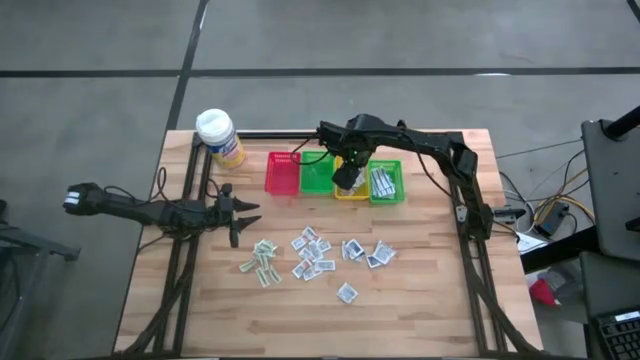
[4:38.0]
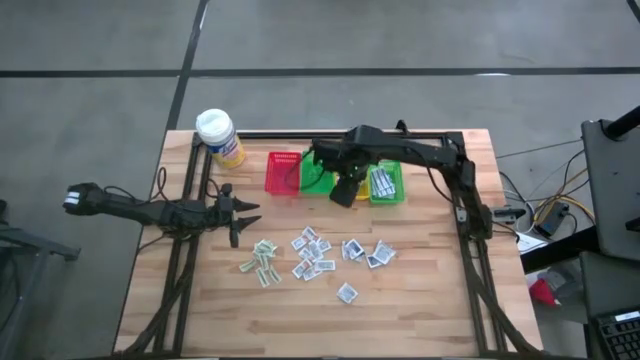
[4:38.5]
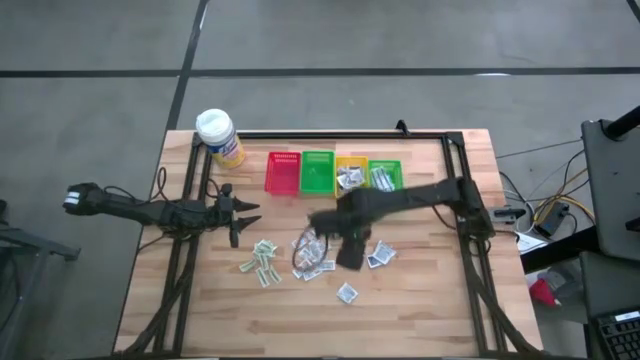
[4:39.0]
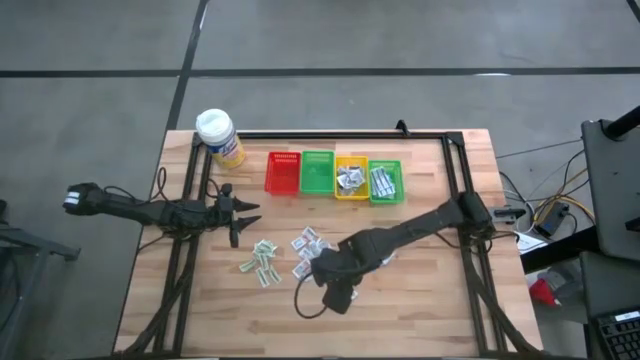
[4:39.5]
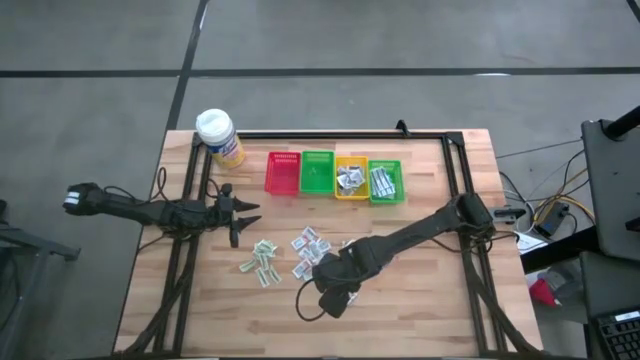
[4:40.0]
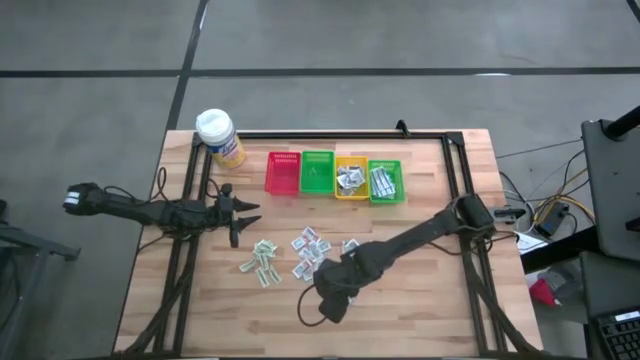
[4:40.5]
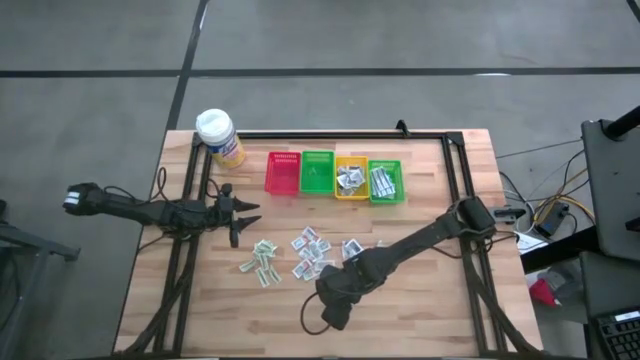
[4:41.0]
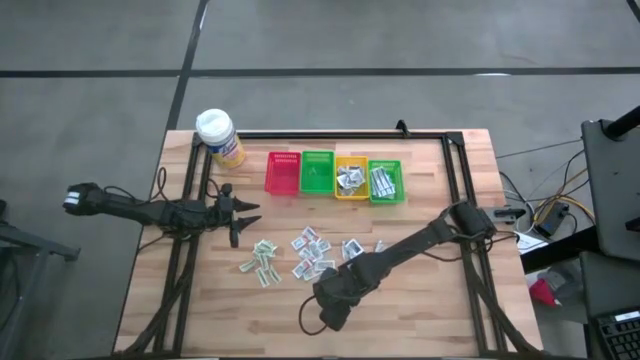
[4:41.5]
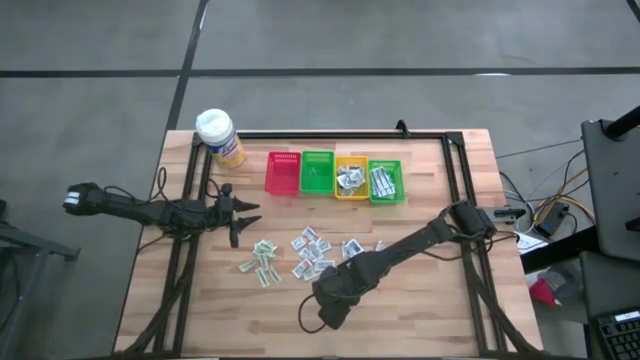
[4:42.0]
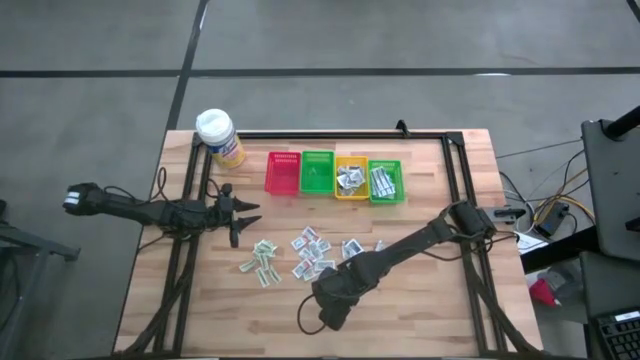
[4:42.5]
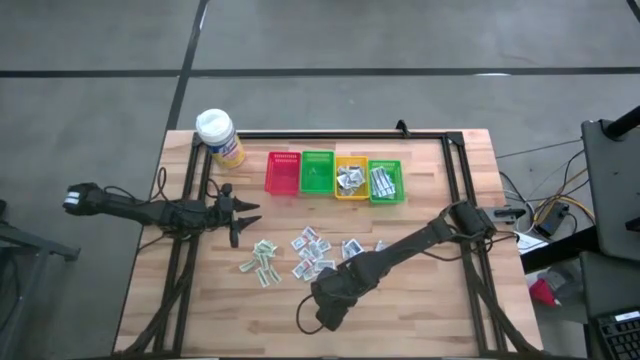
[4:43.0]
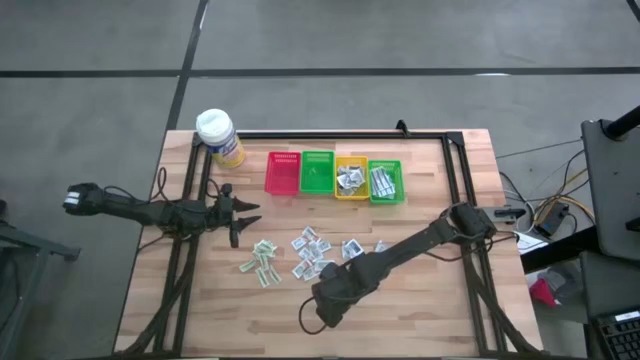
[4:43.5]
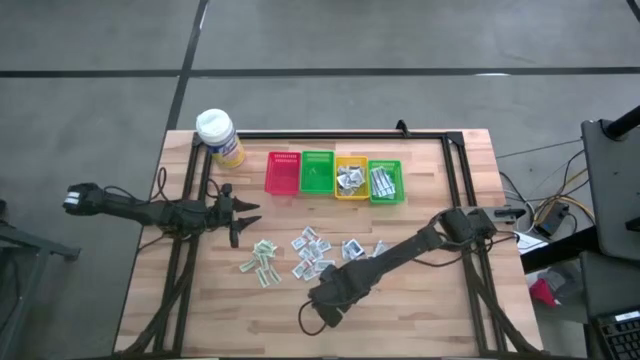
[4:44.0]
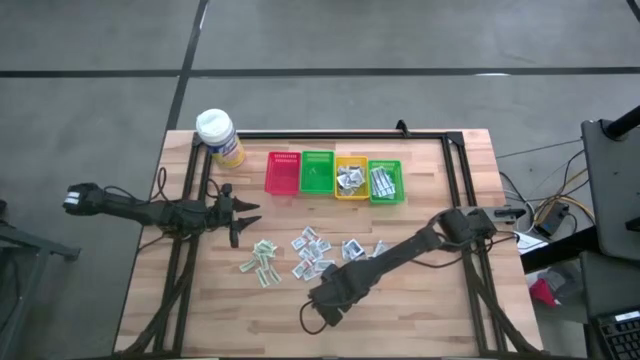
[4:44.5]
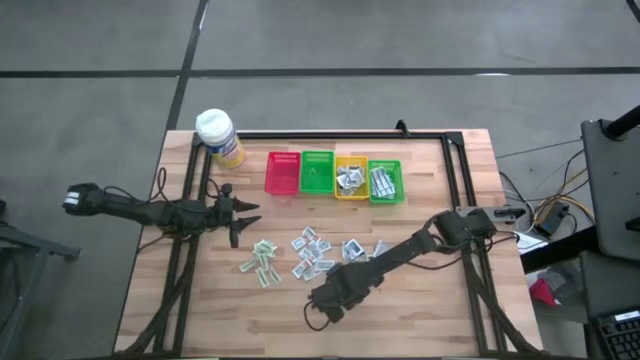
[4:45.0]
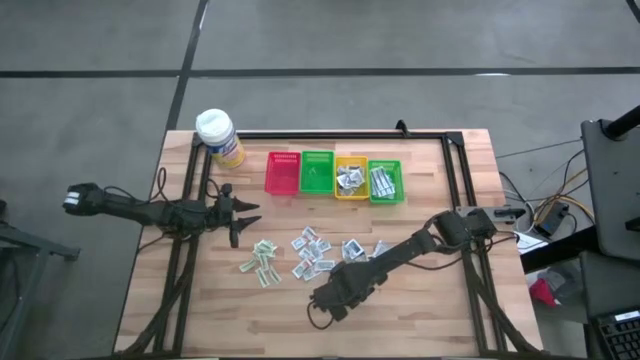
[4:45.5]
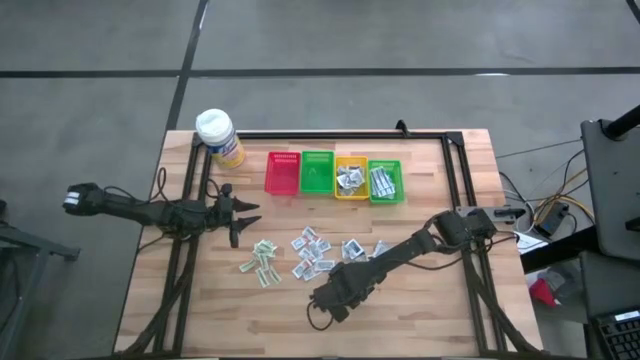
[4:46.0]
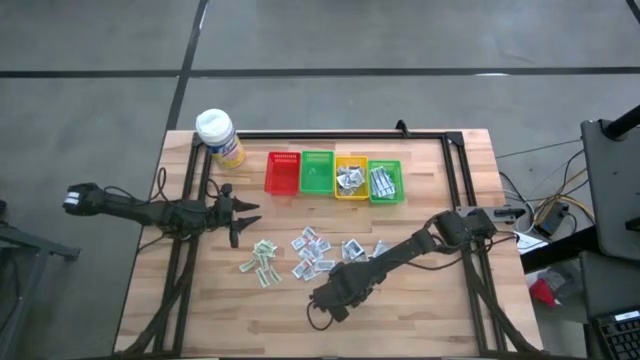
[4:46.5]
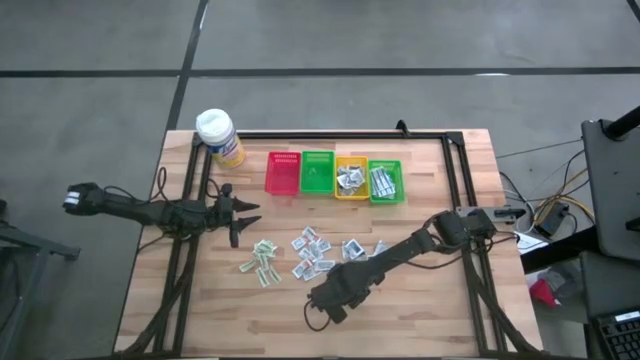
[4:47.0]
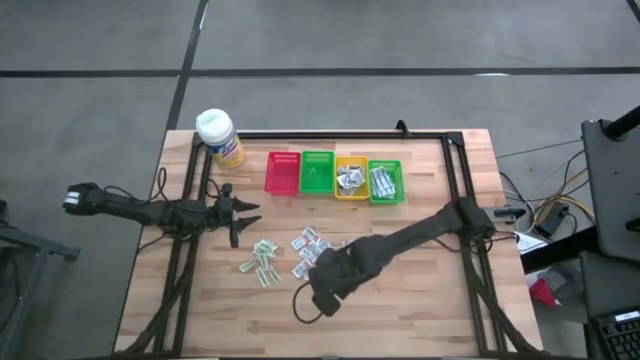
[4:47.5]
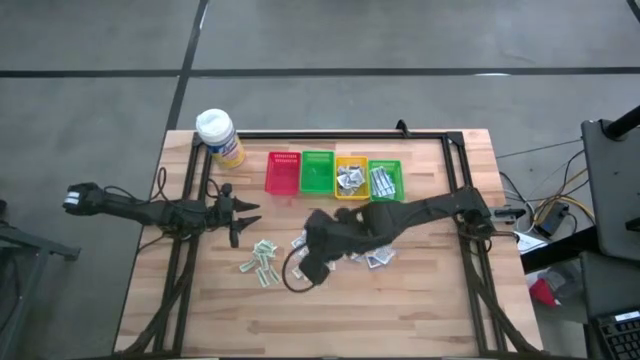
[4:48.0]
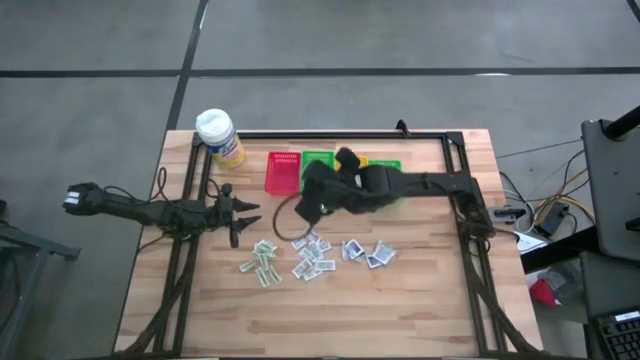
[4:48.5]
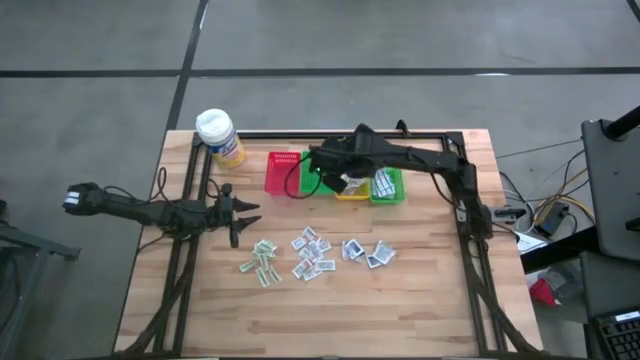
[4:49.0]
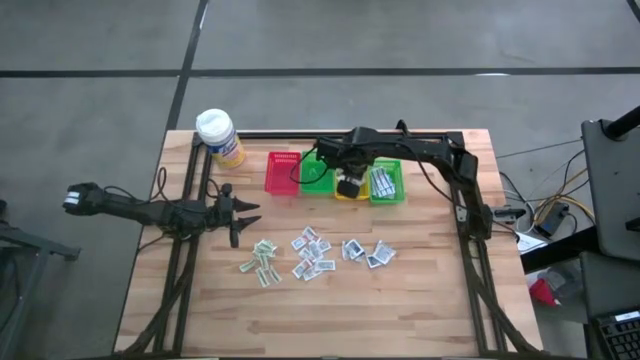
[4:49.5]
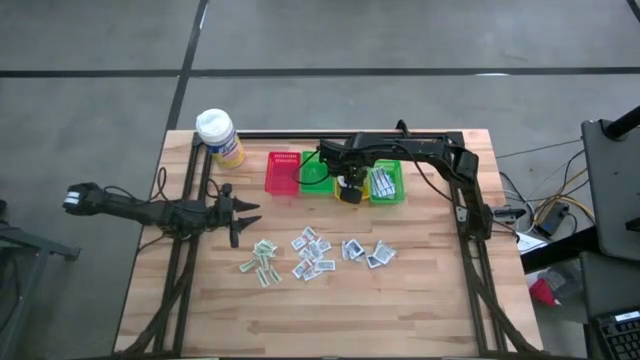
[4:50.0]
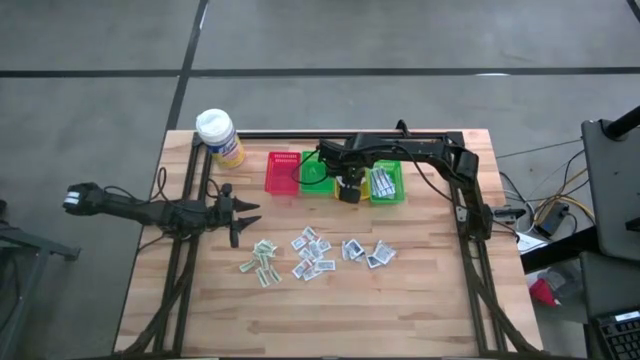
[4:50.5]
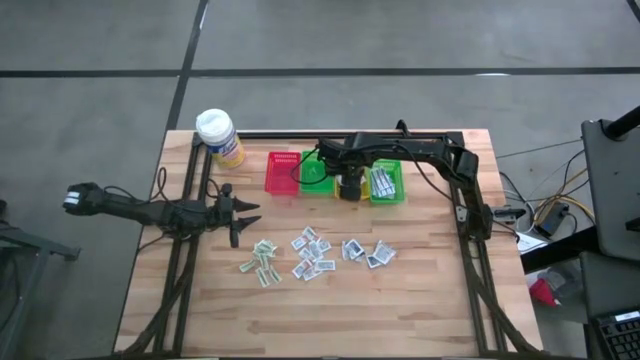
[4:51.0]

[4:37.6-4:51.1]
Task: Pick & Place First Aid Supplies
Put the blue alcohol pad into the yellow bin

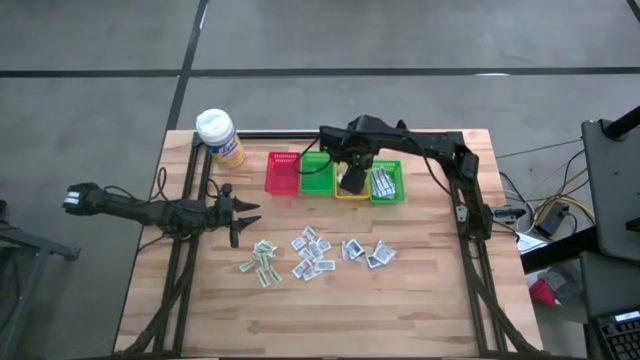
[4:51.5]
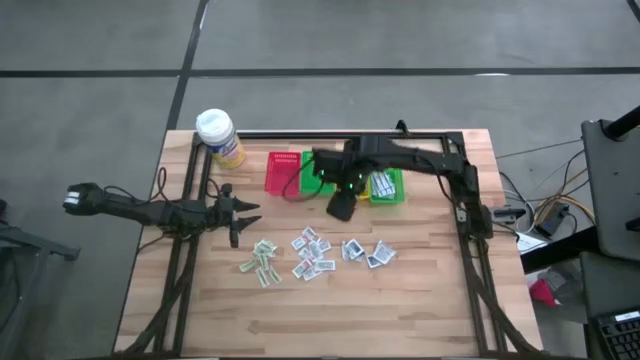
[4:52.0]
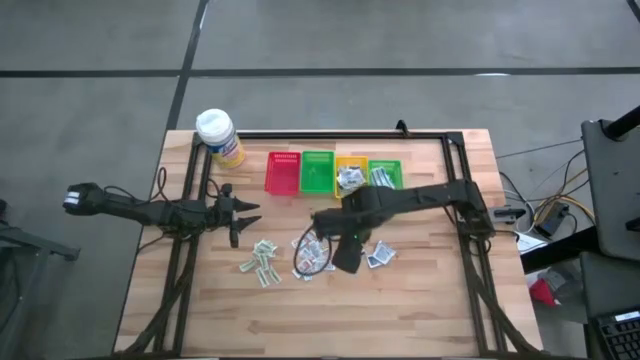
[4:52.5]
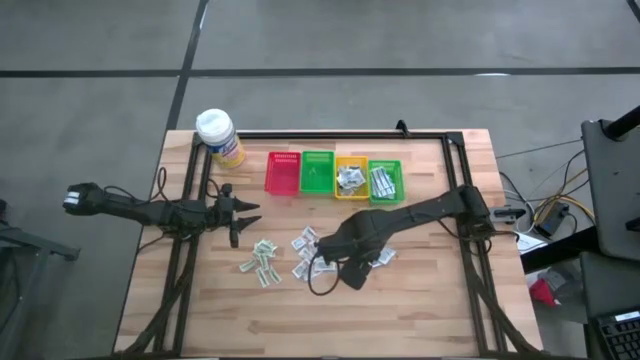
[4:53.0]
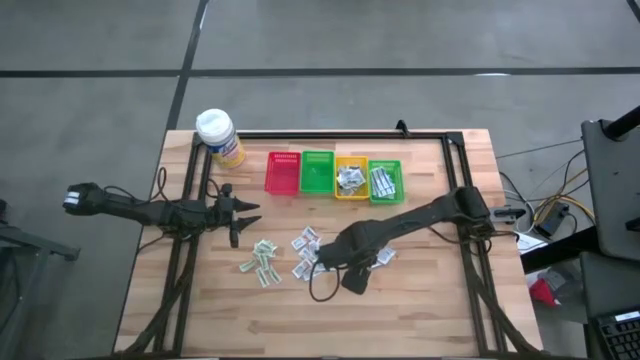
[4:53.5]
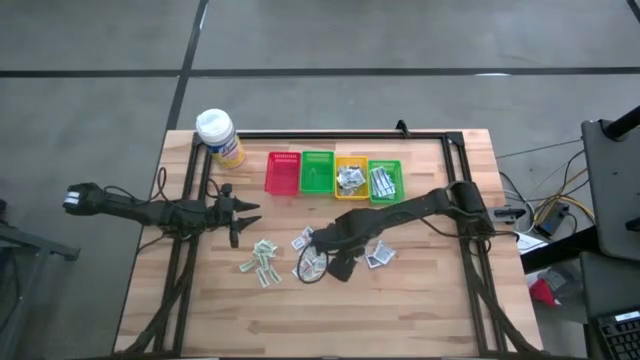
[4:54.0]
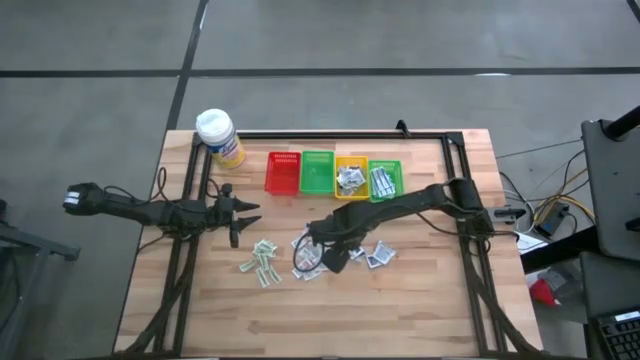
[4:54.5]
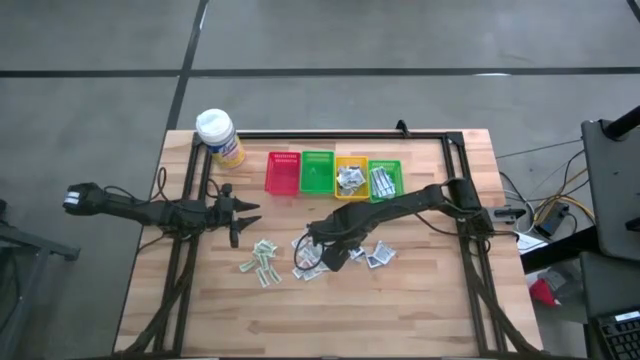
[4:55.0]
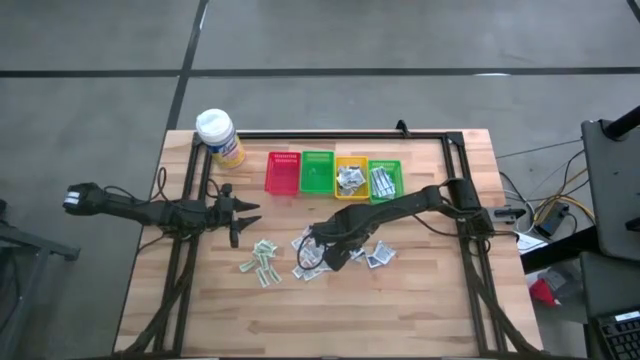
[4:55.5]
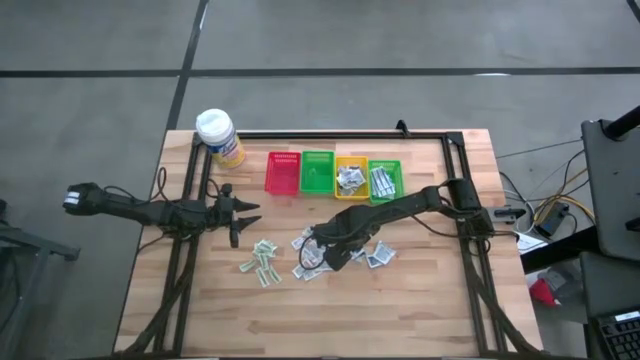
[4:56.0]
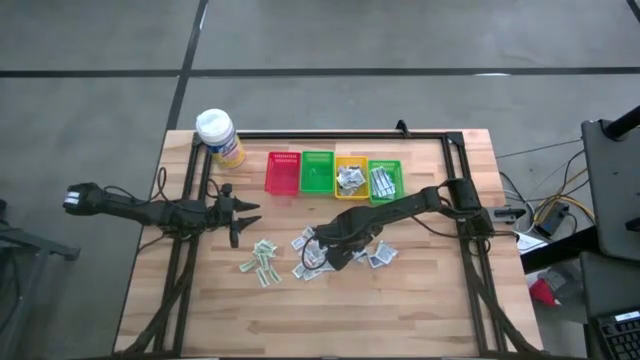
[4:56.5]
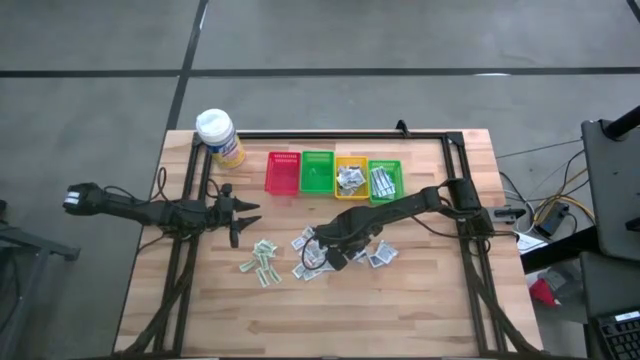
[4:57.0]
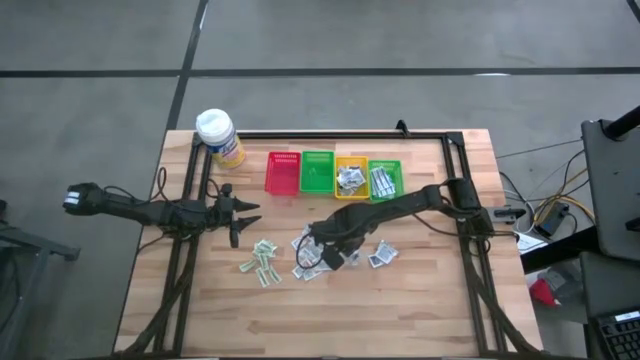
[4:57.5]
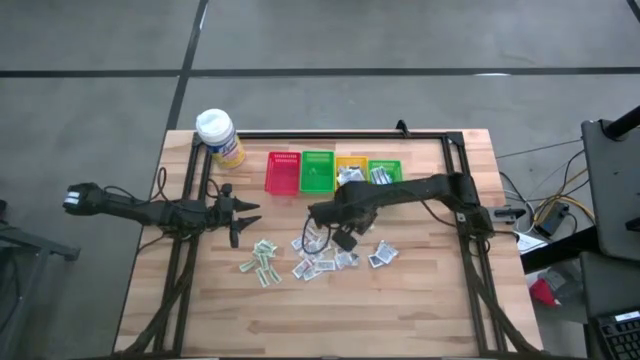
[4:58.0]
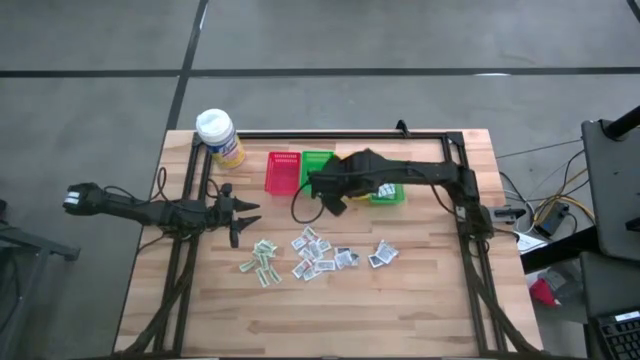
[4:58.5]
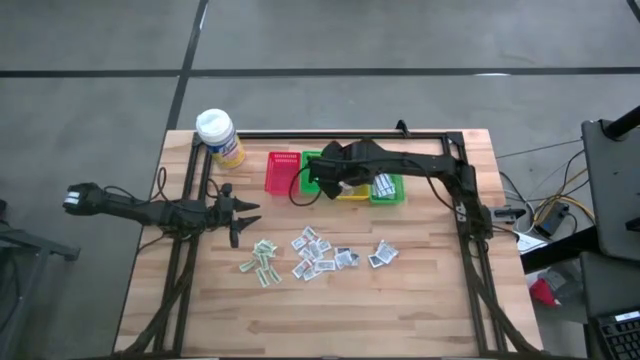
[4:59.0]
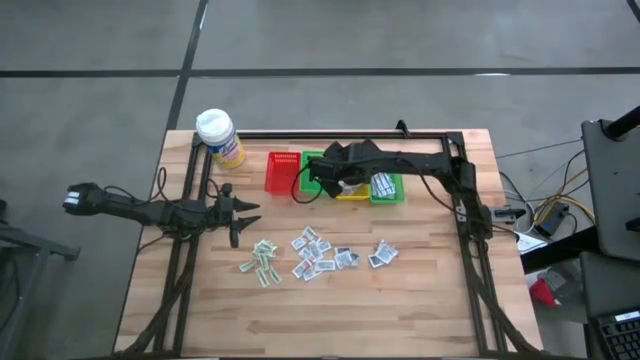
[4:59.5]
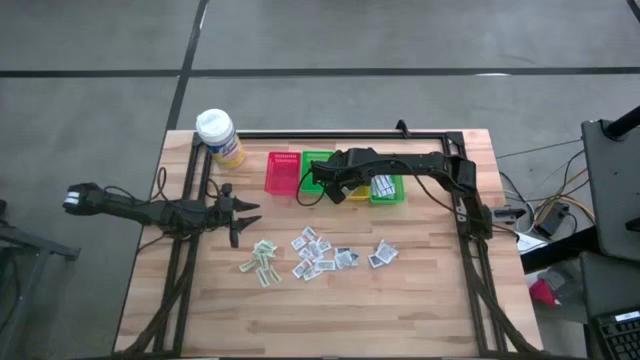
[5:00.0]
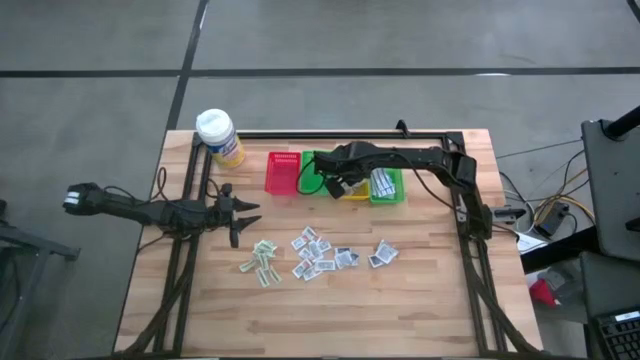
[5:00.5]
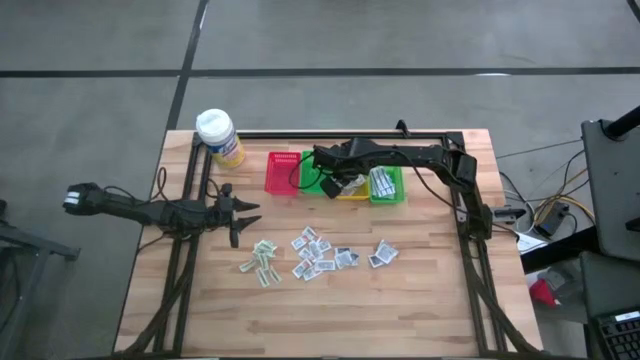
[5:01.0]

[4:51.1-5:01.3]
Put the blue alcohol pad into the yellow bin
